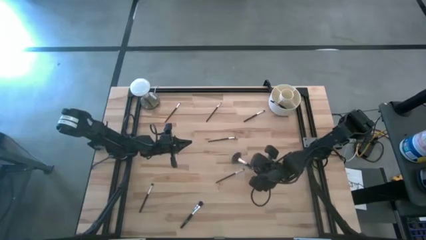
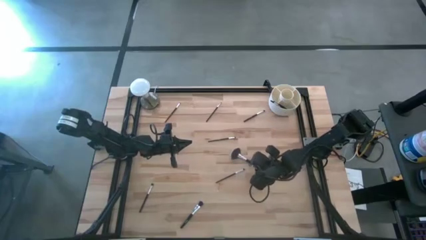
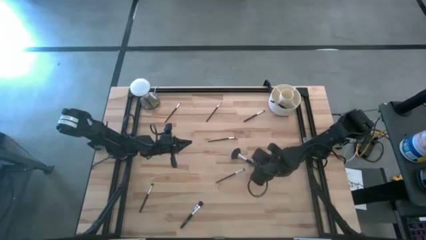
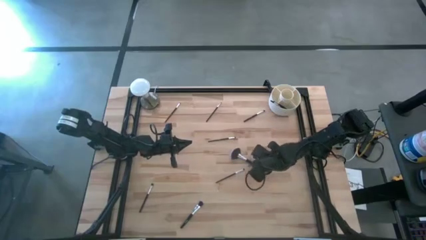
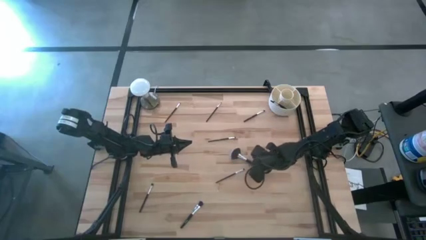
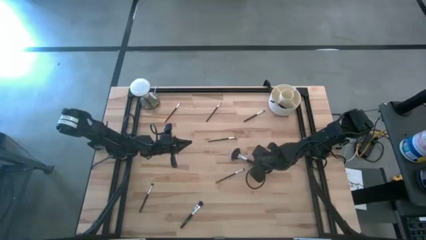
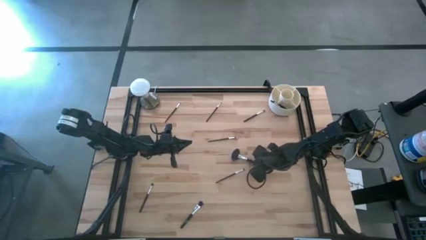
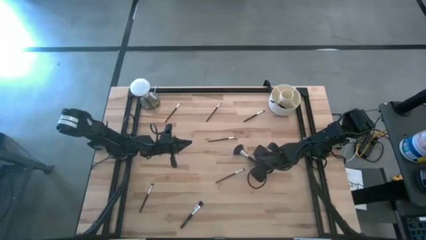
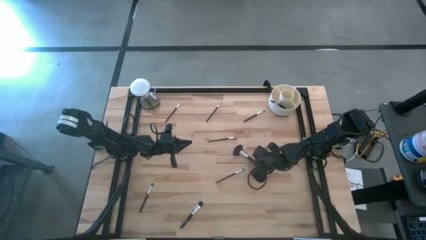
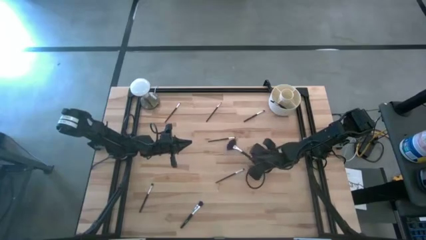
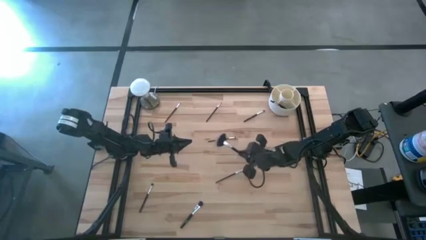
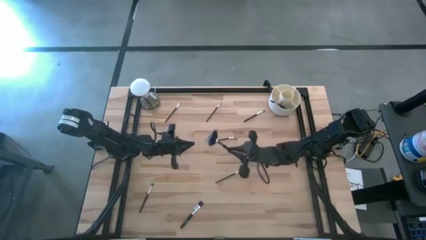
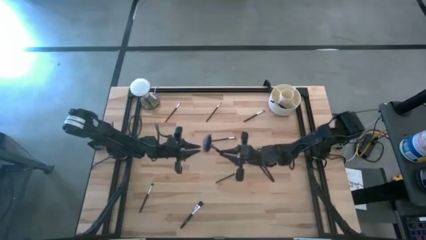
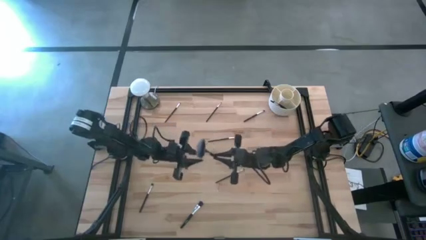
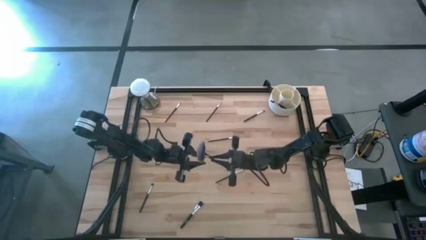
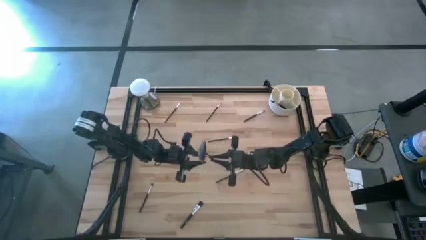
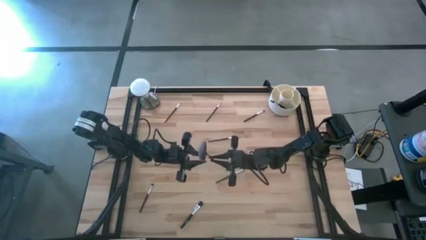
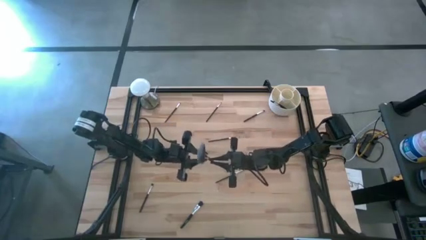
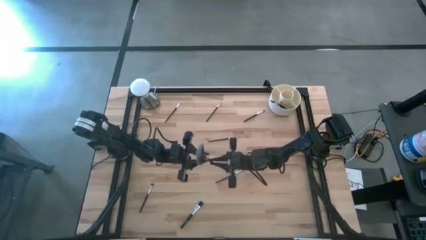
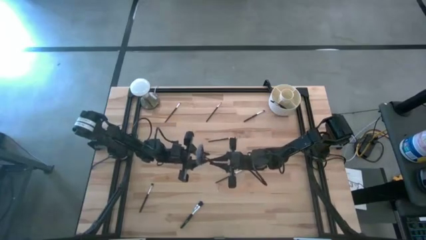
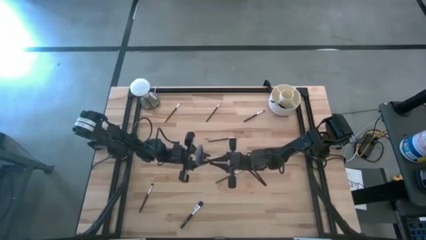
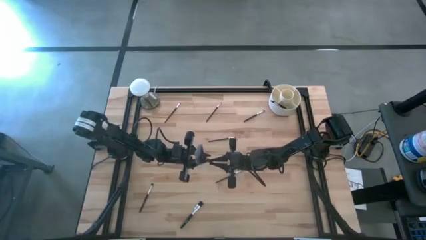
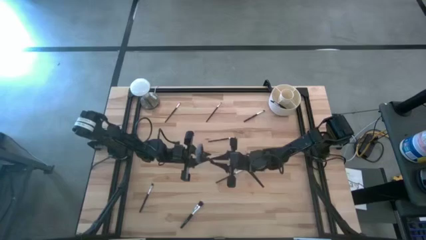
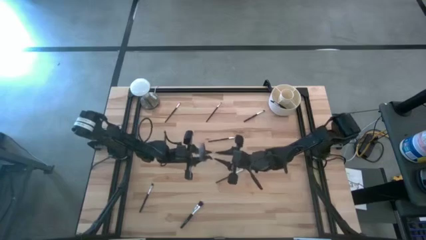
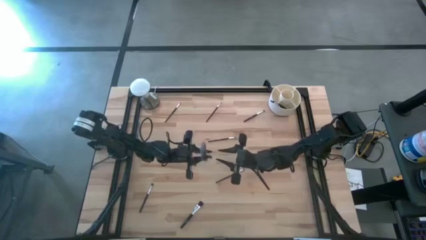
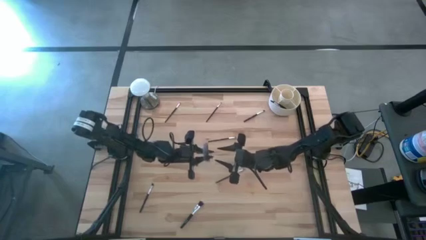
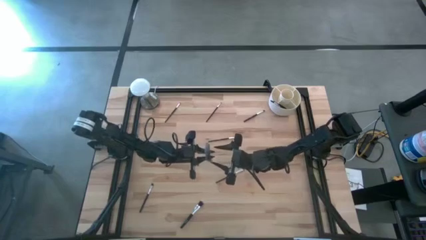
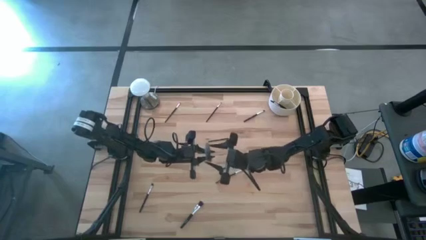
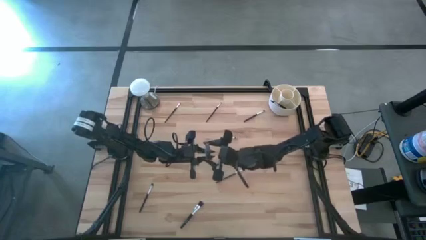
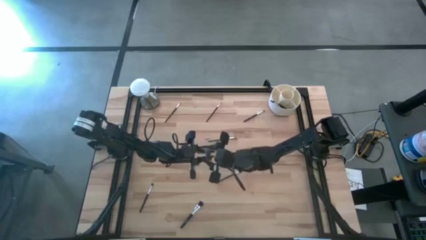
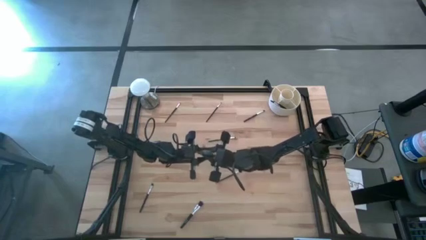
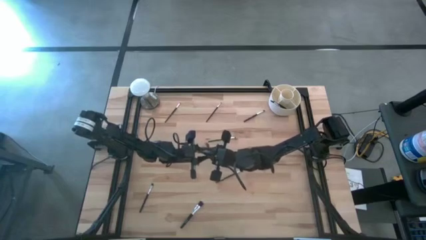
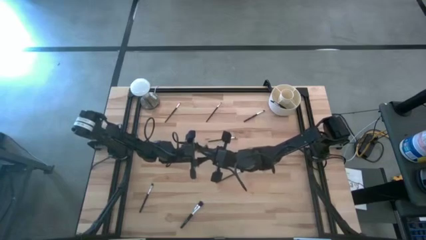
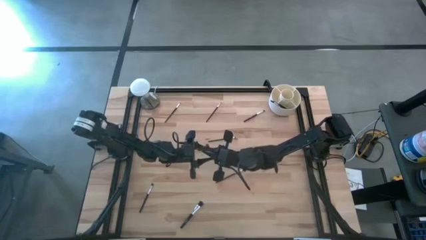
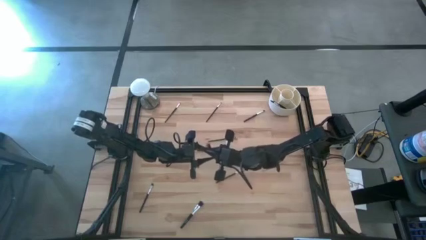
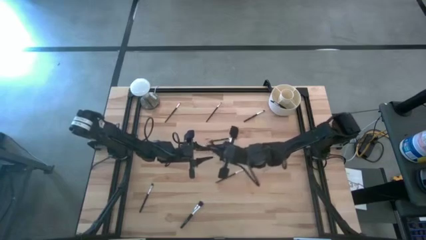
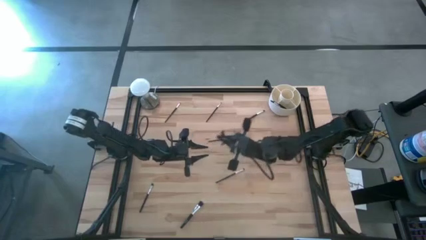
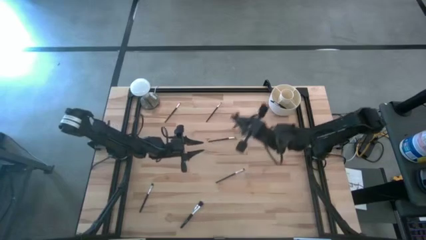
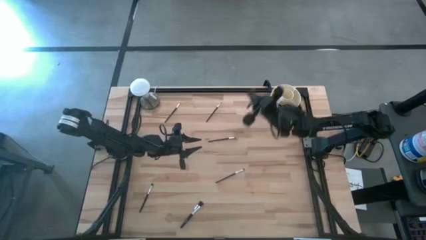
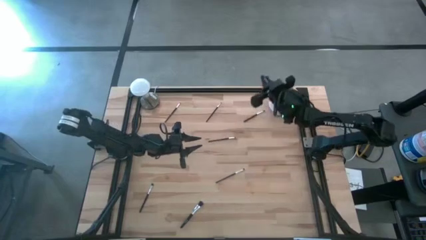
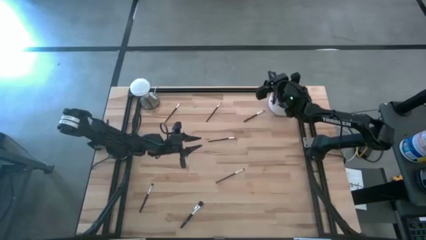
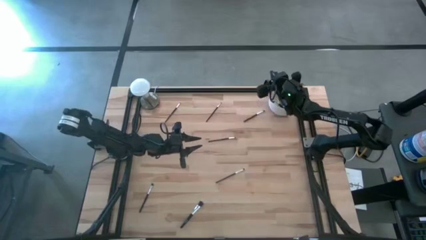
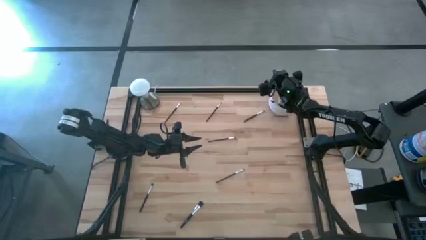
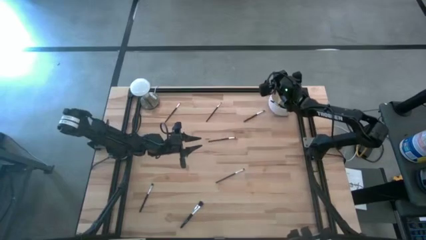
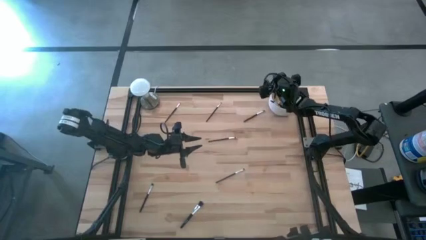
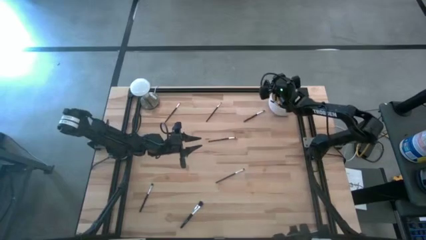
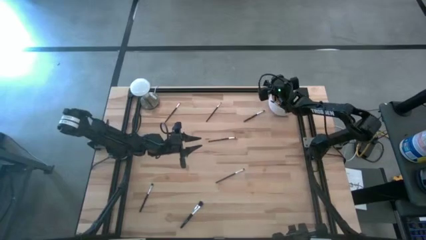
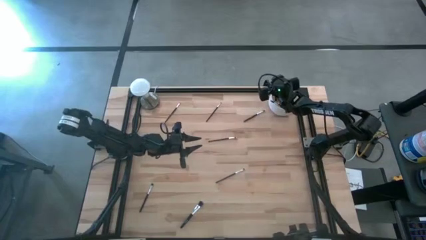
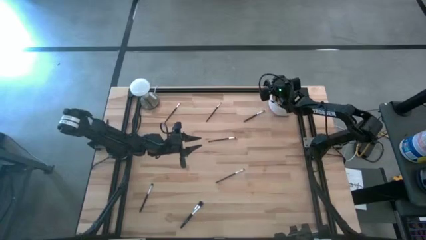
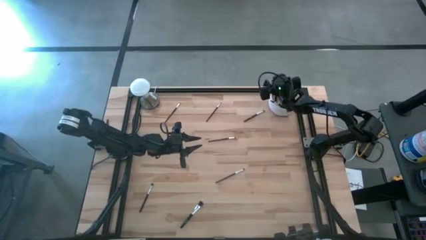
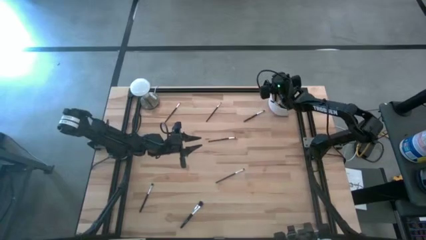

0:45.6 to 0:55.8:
Task: Put items in baskets/containers
Put the black highlighter brush into the white organizer

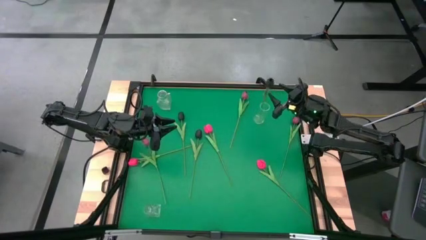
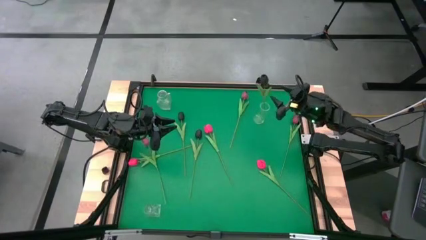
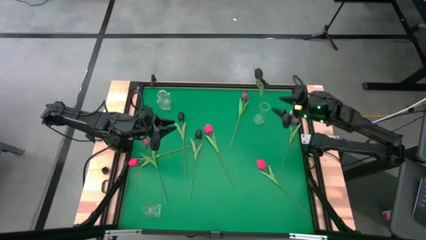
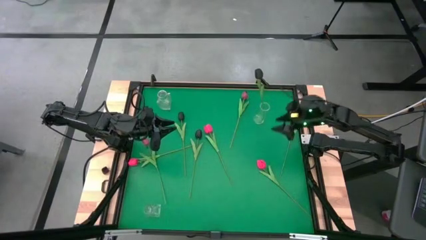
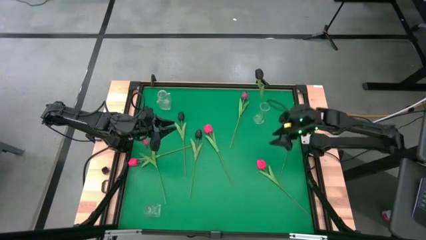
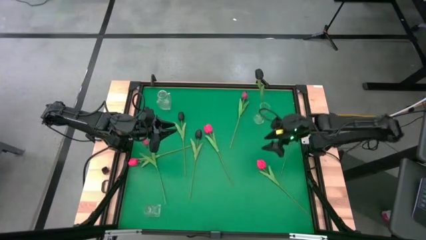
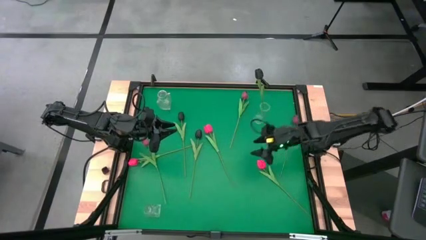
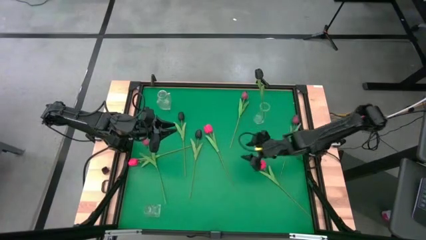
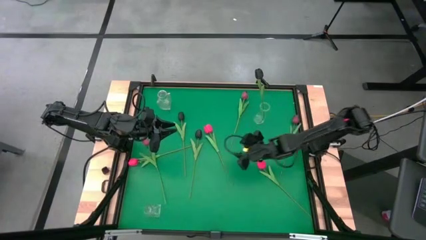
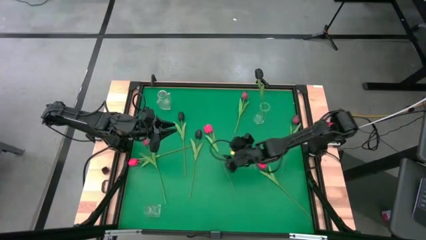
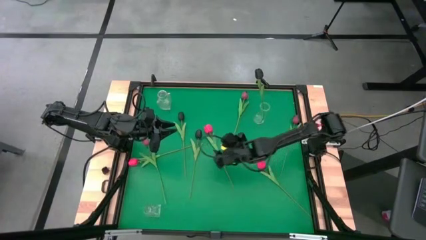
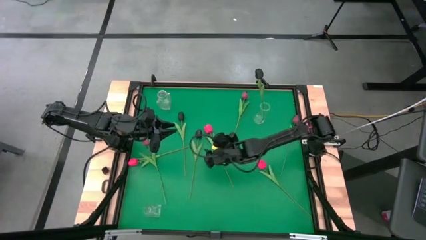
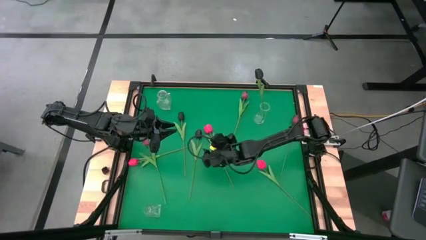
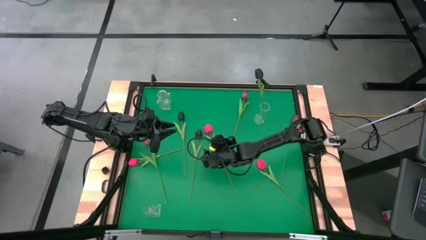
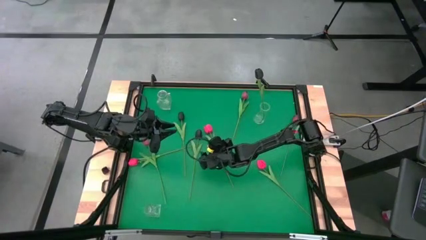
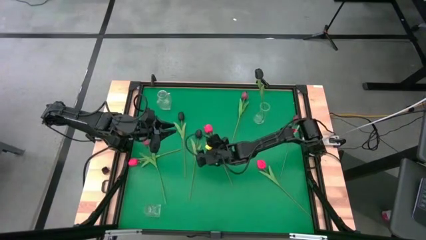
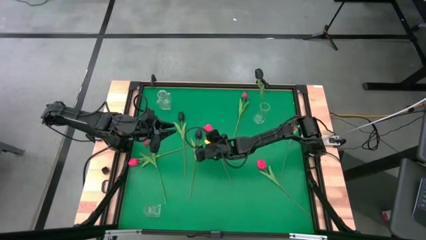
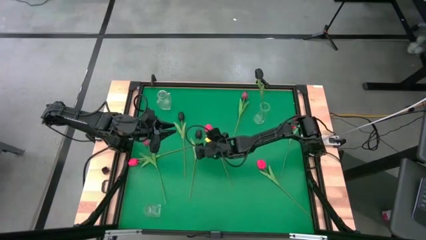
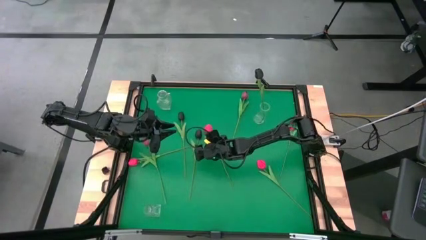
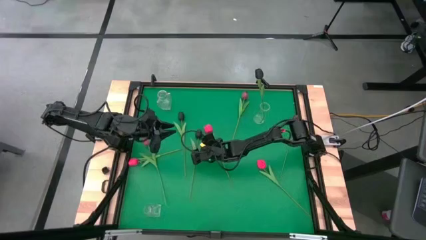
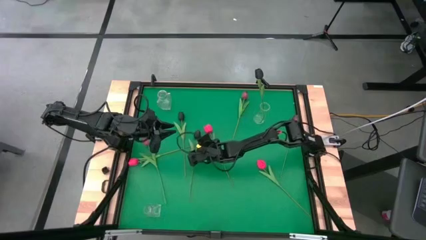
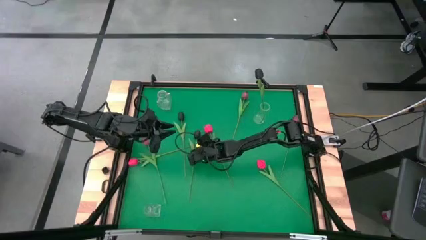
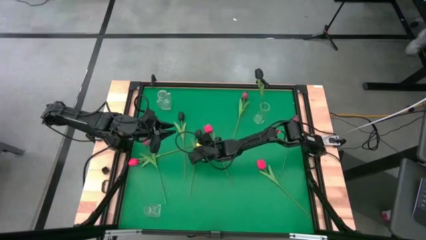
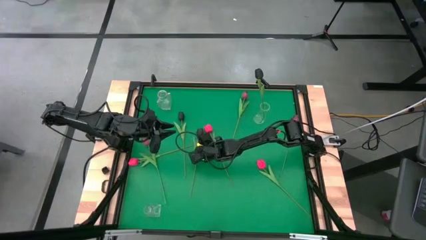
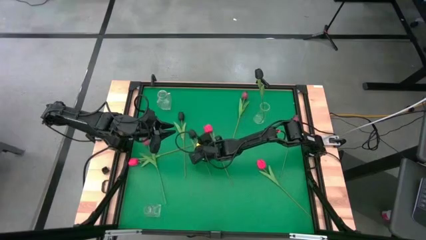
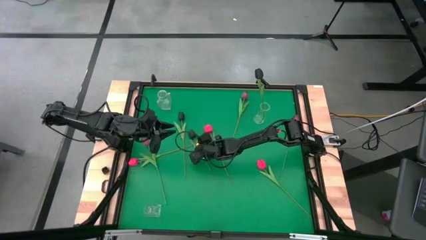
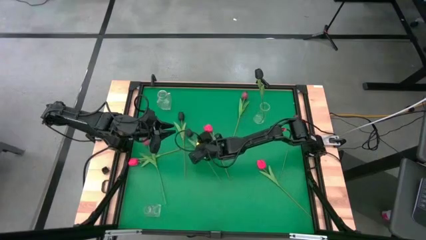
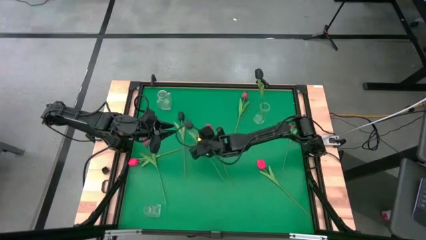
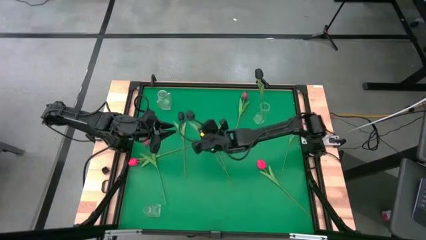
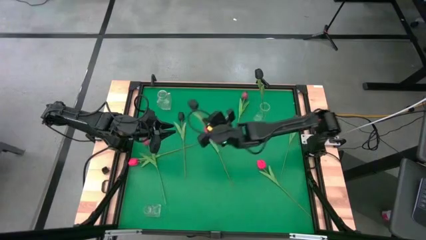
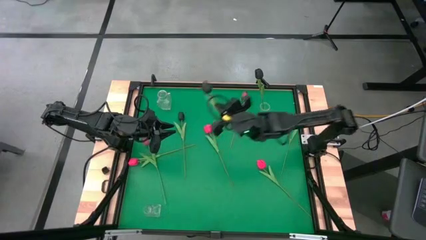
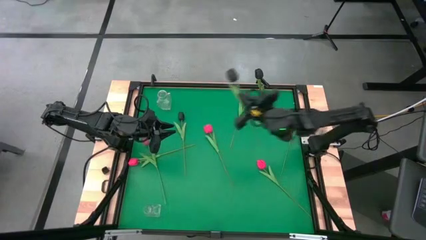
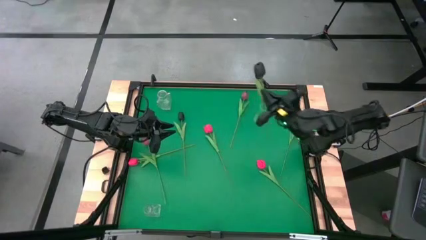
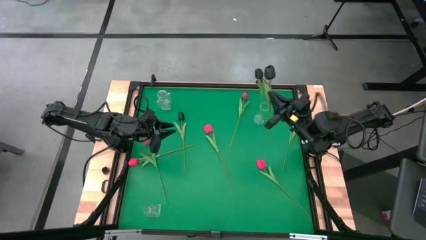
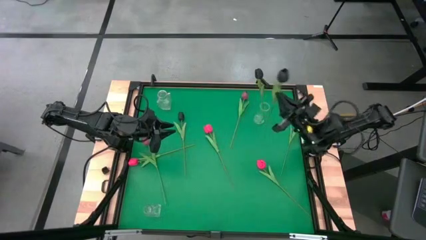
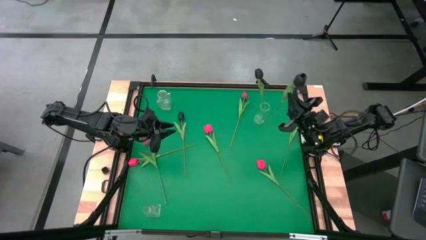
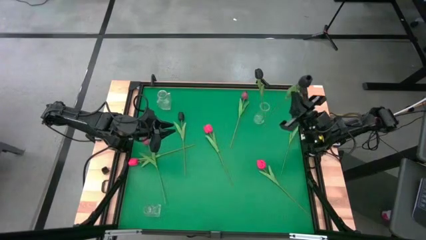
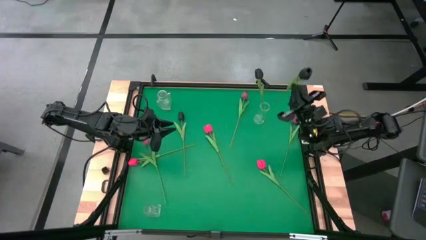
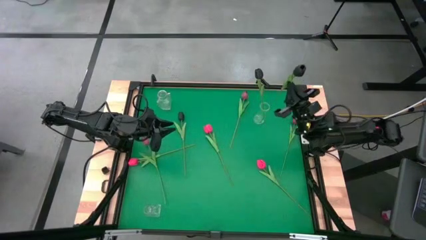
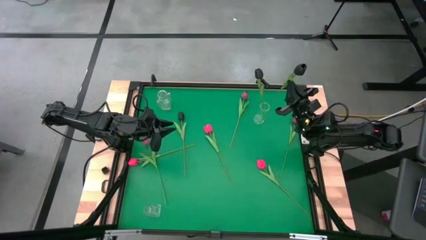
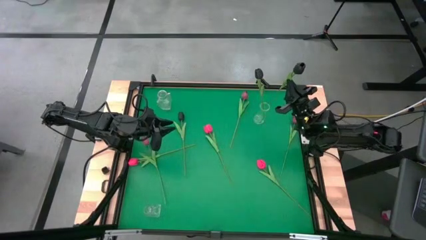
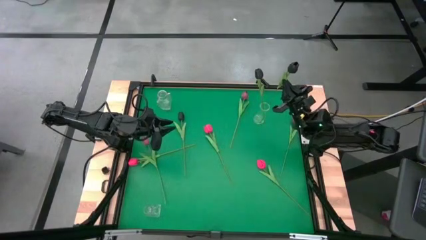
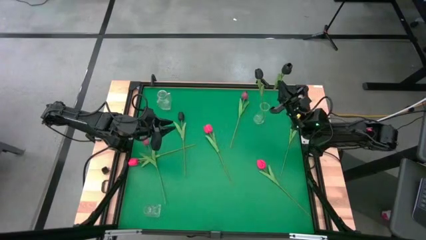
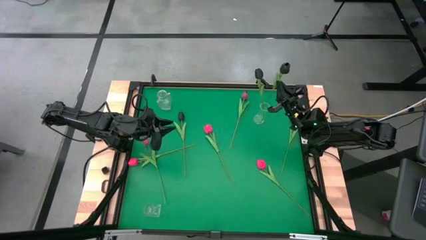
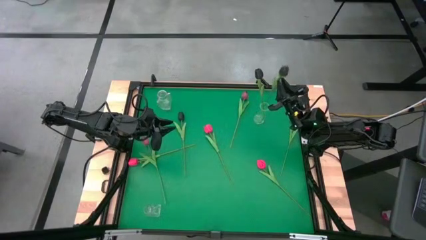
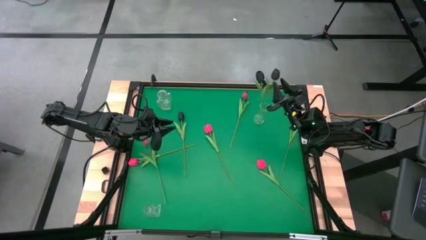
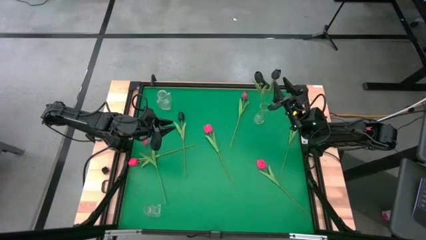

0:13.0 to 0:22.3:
Task: Sort flowers into vase by color
Put the right black flower into the top right transparent vase
